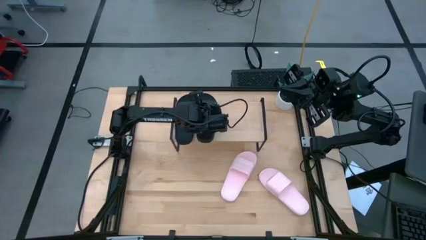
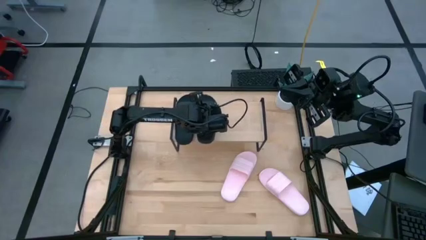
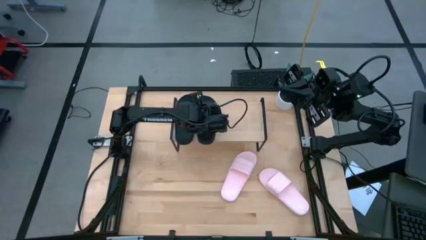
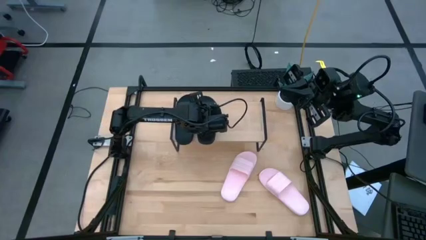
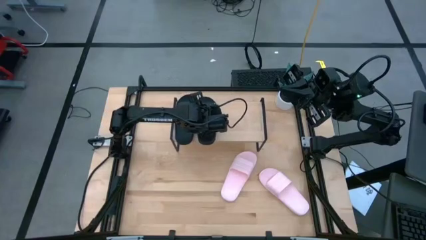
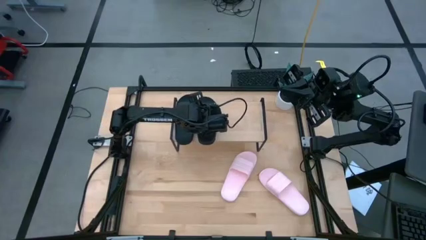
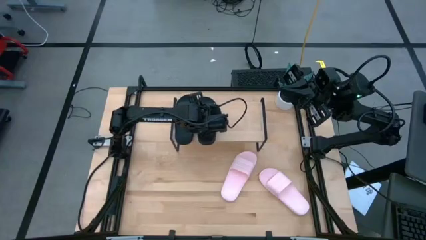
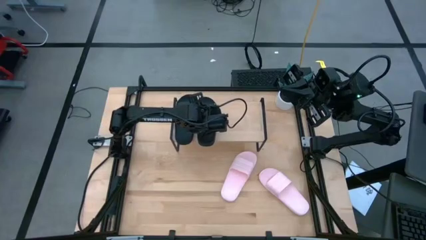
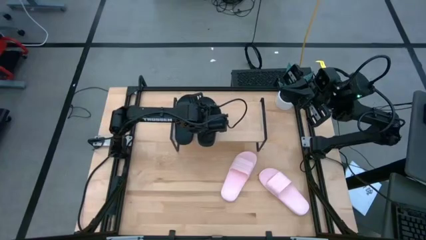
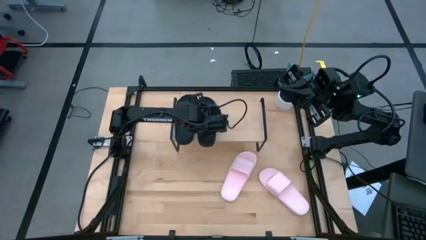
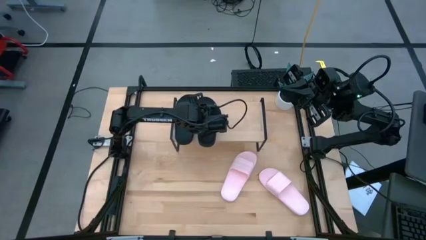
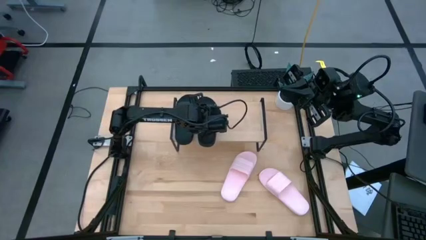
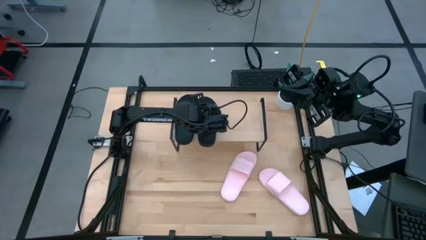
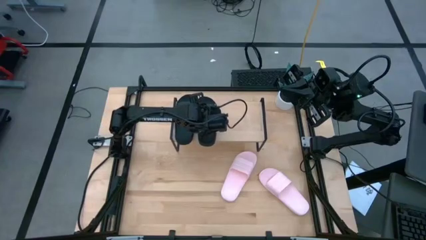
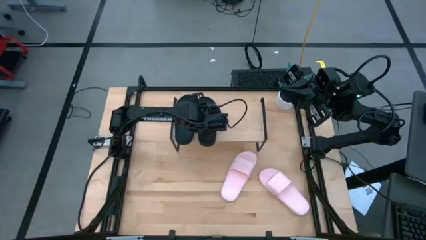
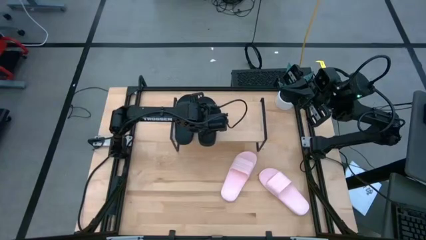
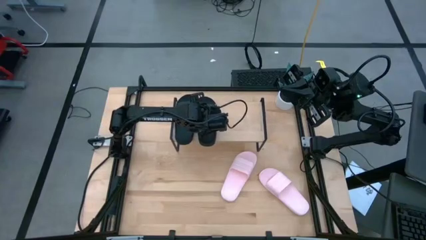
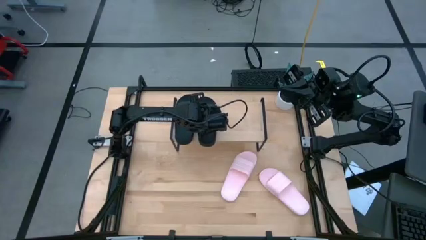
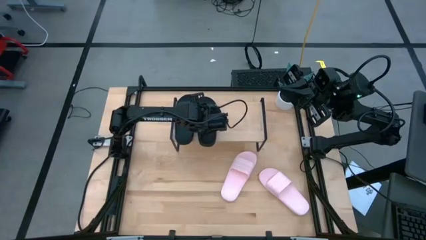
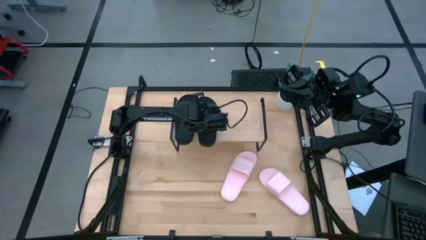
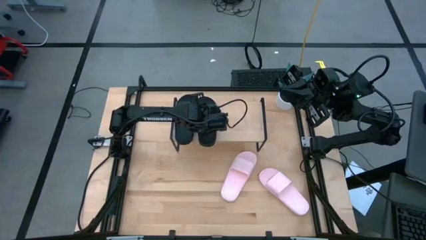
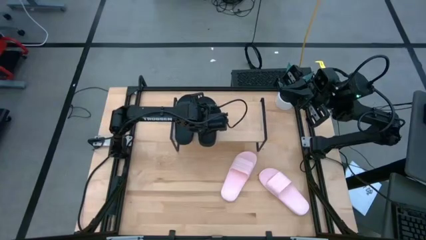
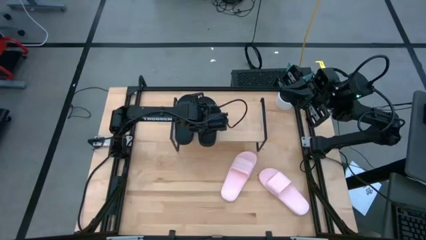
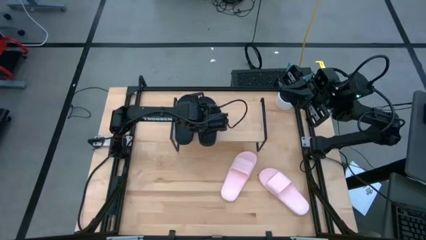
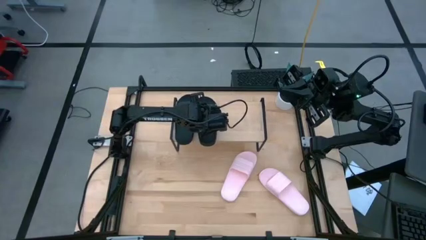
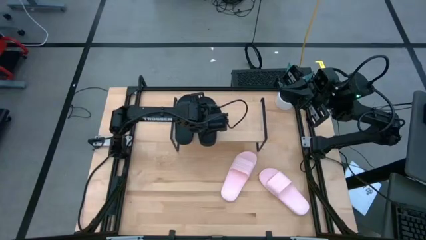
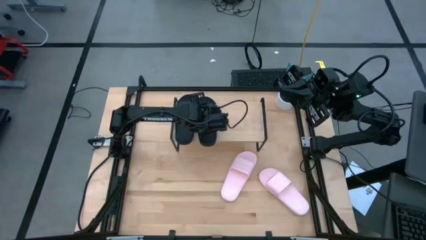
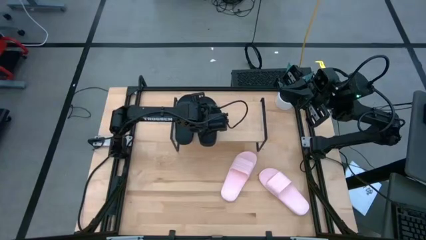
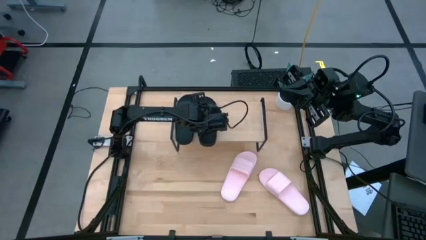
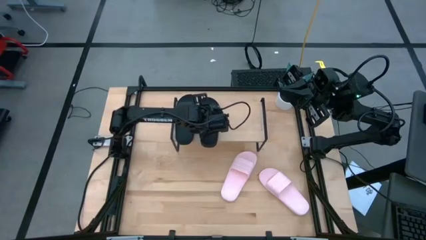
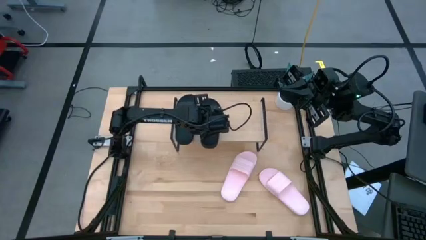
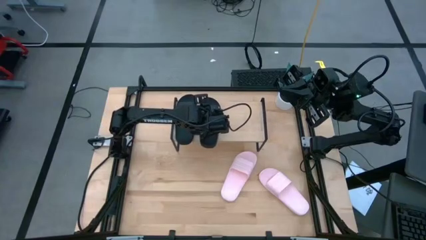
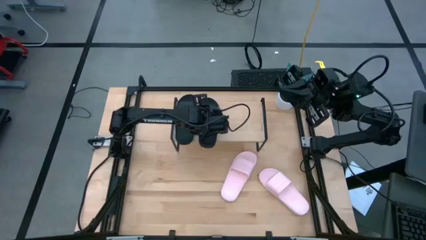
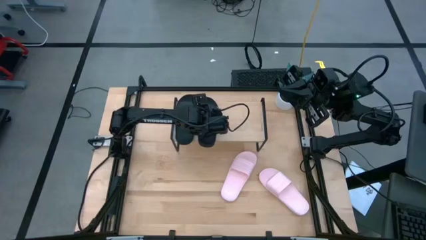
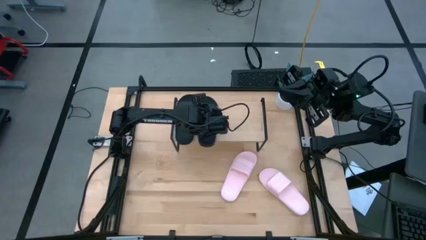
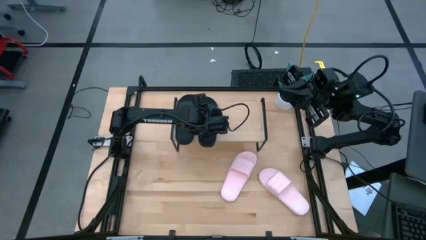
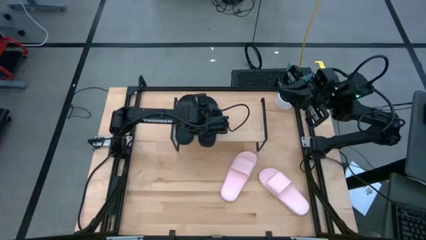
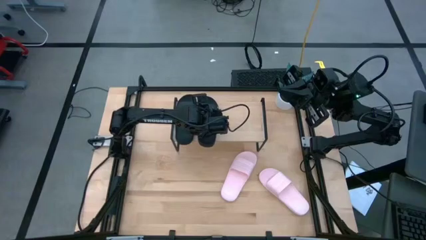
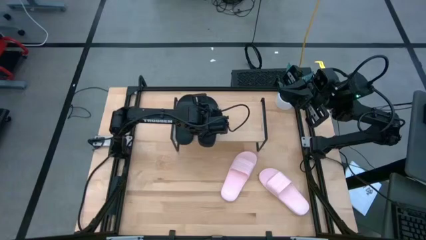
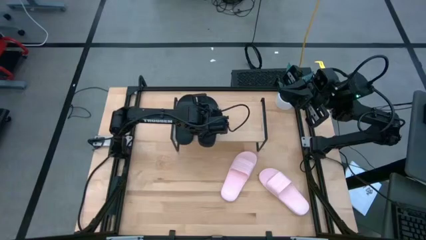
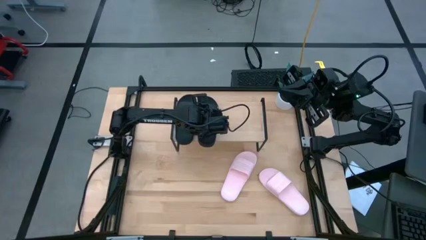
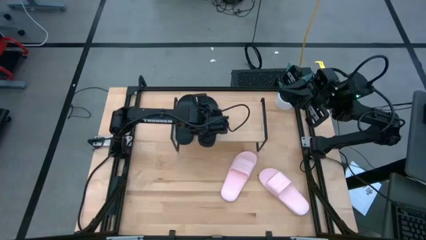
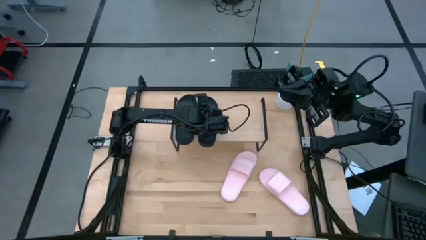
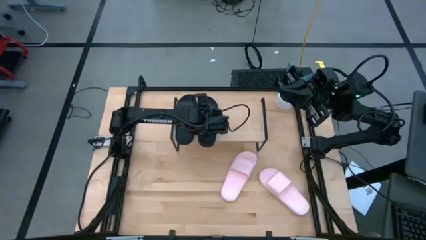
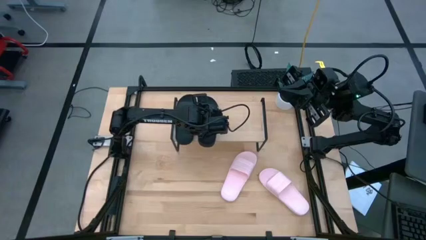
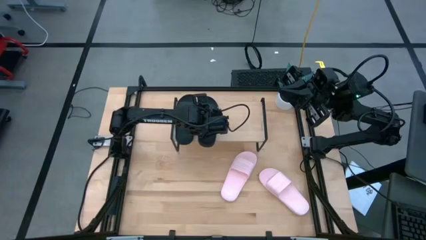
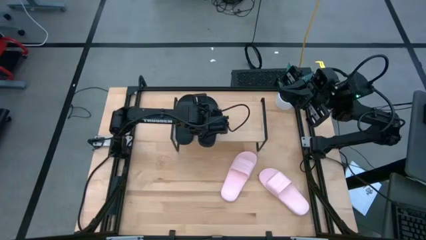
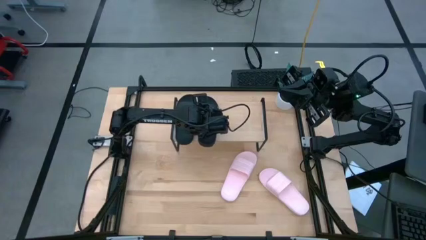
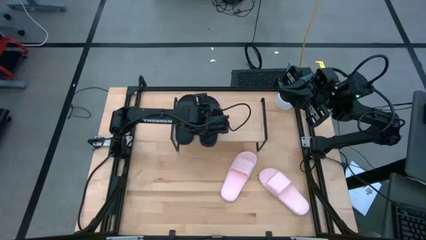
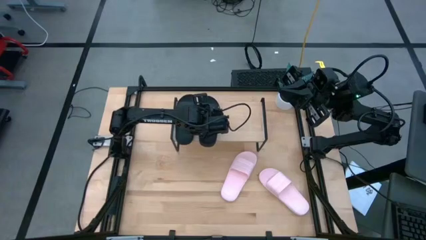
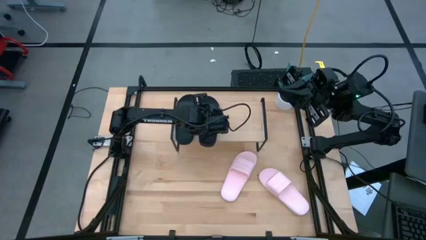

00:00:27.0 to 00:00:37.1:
Task: Pick and place slides into the shelf
Put the black slide next to the black slide on the shelf
